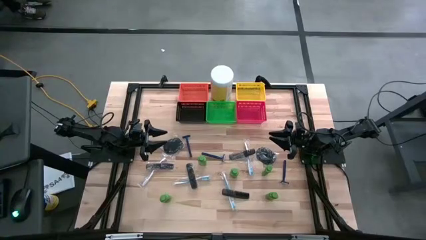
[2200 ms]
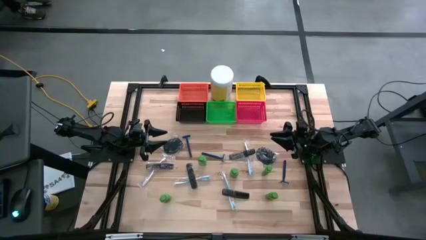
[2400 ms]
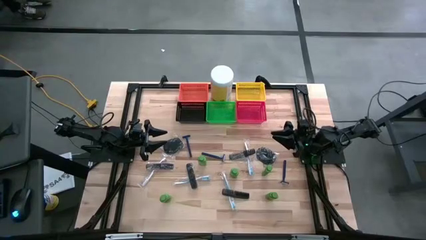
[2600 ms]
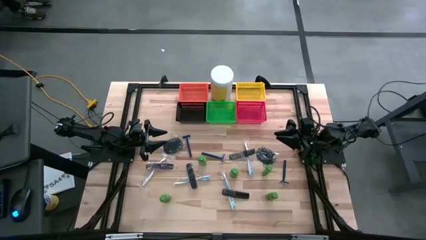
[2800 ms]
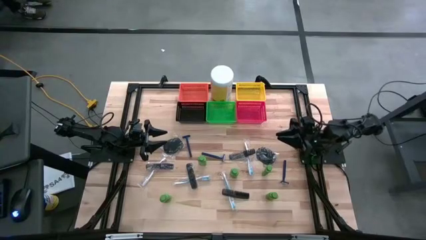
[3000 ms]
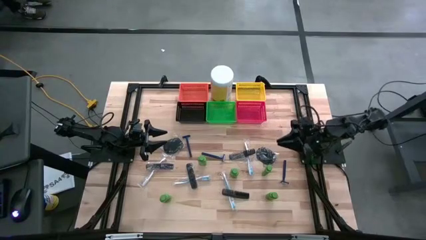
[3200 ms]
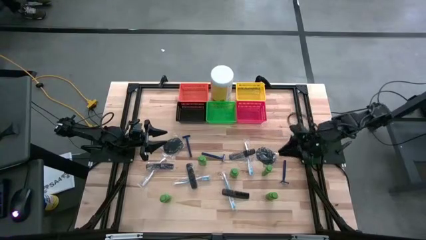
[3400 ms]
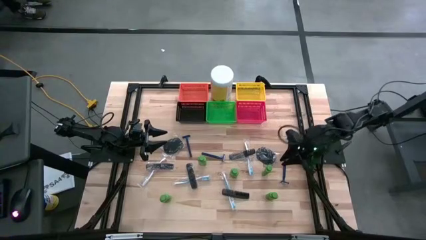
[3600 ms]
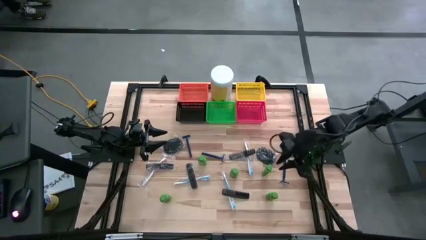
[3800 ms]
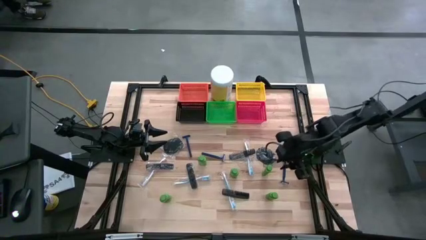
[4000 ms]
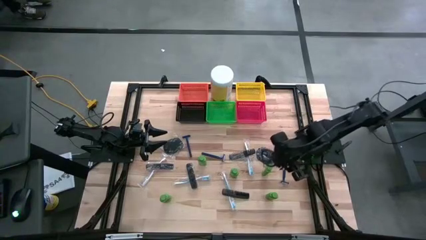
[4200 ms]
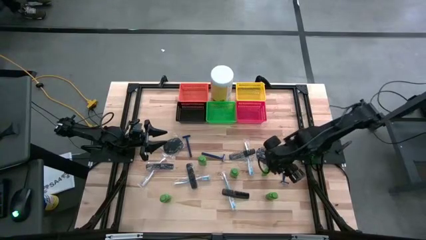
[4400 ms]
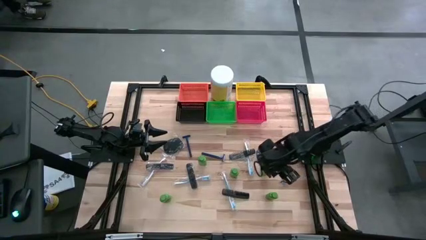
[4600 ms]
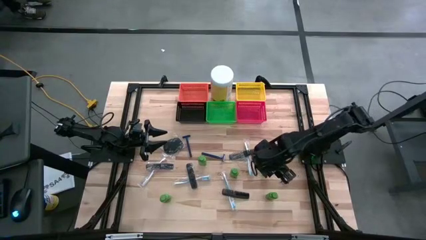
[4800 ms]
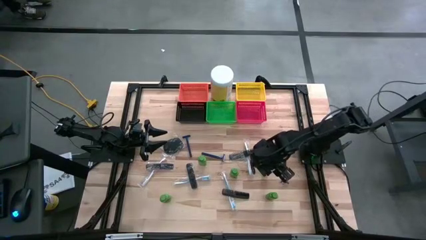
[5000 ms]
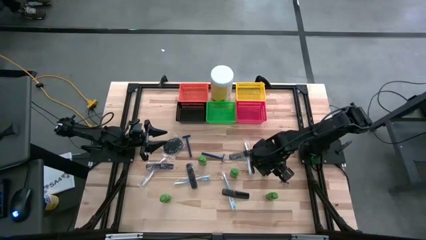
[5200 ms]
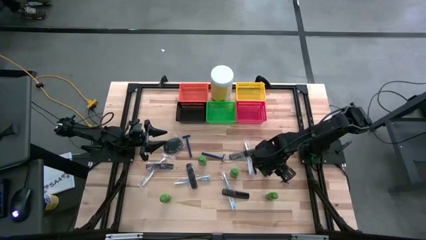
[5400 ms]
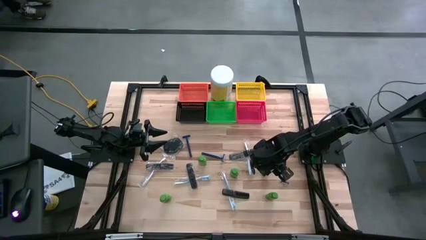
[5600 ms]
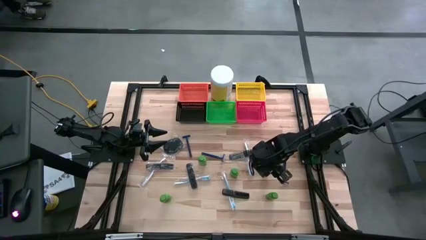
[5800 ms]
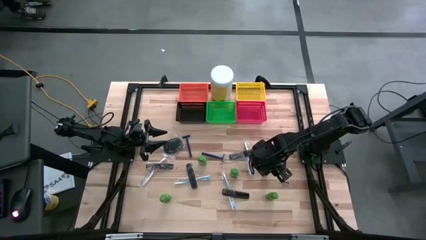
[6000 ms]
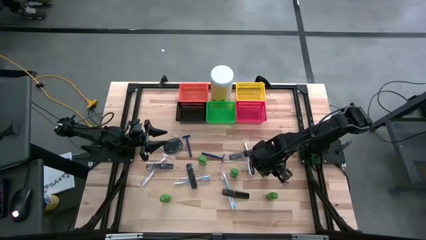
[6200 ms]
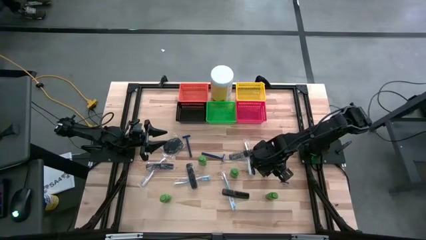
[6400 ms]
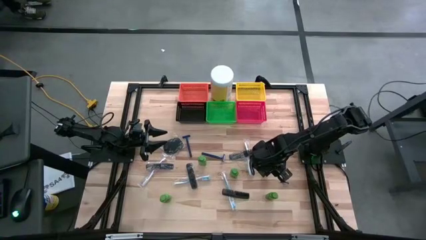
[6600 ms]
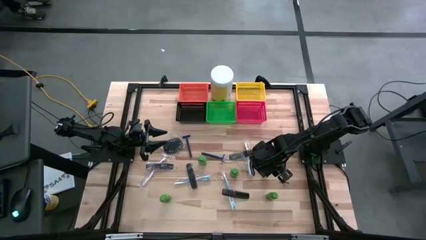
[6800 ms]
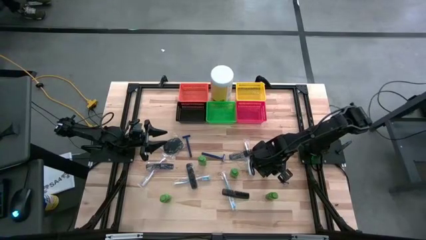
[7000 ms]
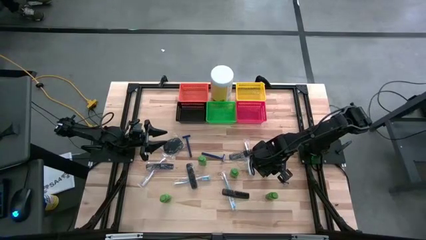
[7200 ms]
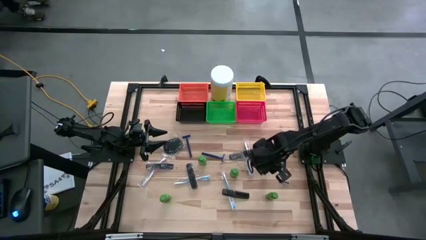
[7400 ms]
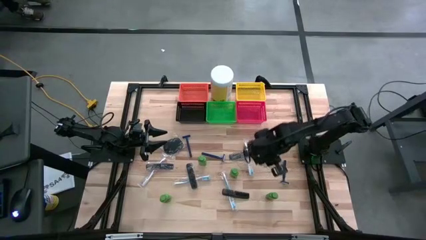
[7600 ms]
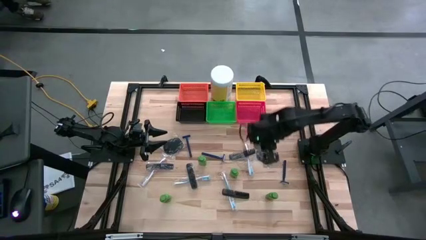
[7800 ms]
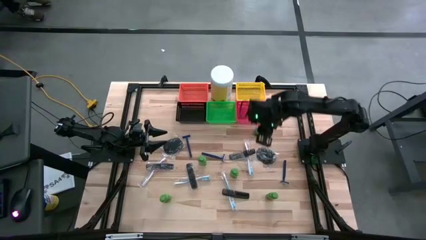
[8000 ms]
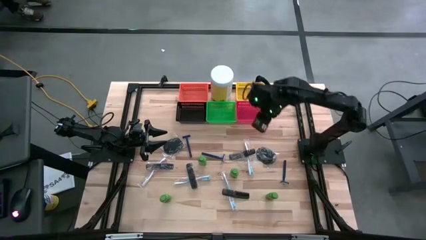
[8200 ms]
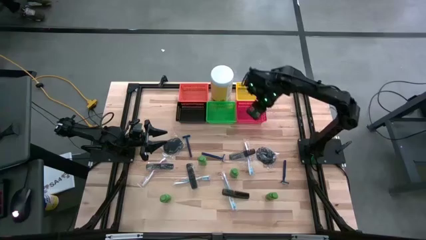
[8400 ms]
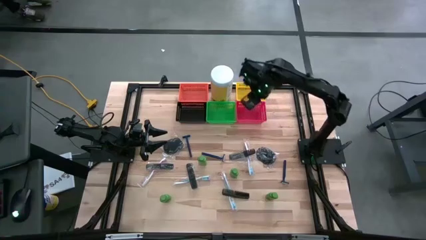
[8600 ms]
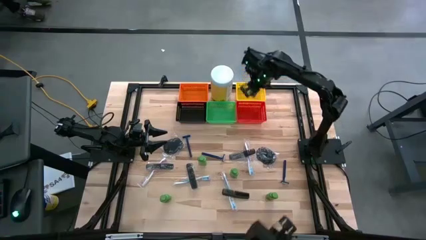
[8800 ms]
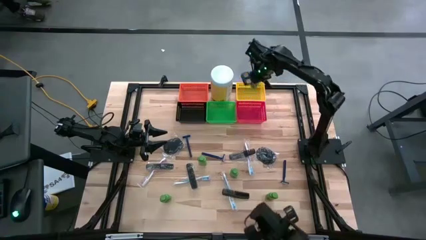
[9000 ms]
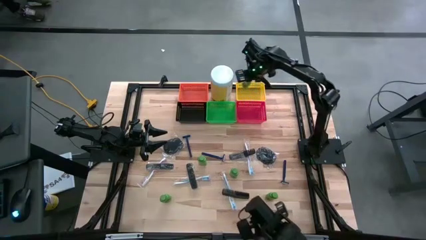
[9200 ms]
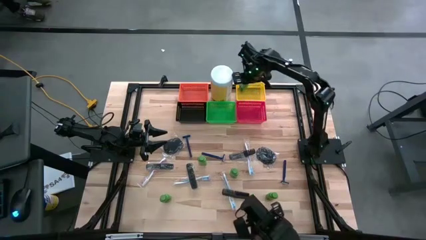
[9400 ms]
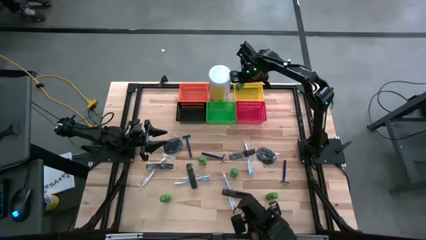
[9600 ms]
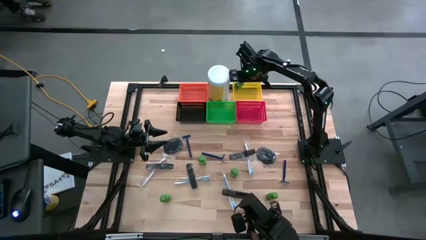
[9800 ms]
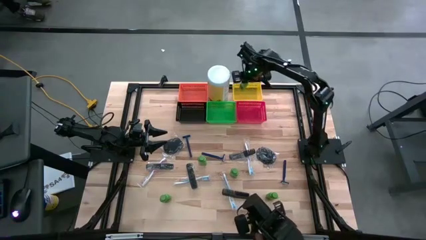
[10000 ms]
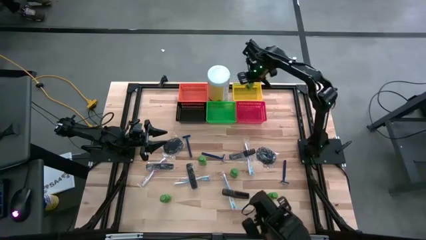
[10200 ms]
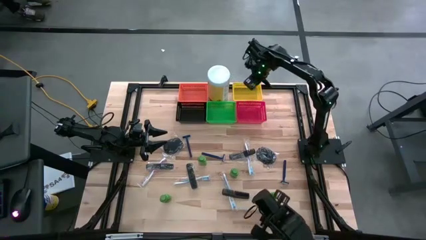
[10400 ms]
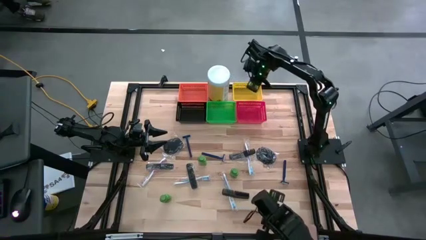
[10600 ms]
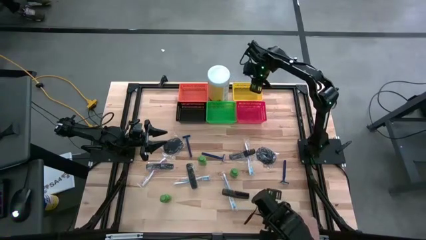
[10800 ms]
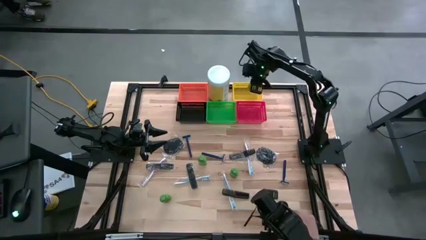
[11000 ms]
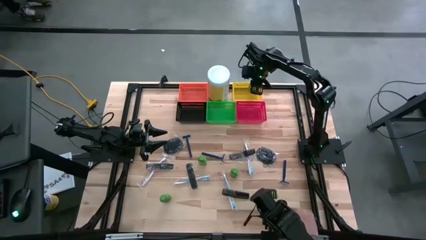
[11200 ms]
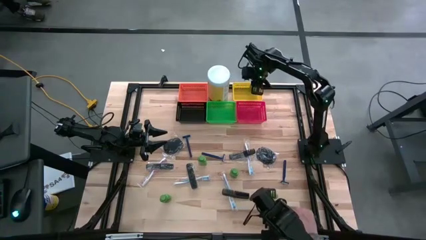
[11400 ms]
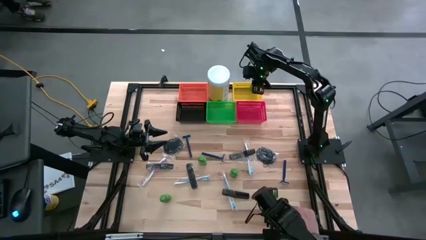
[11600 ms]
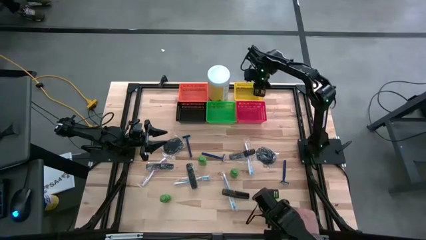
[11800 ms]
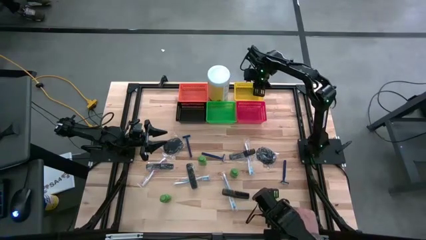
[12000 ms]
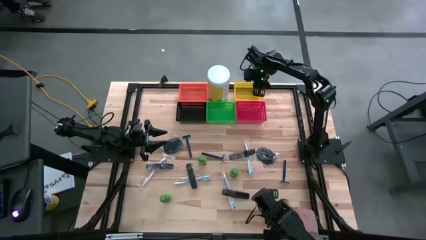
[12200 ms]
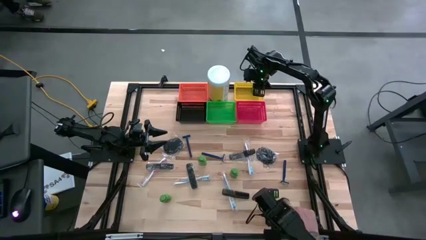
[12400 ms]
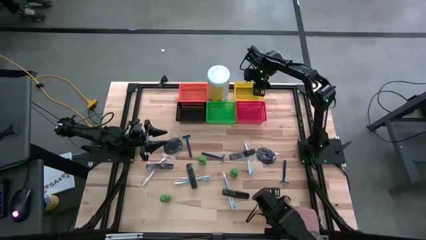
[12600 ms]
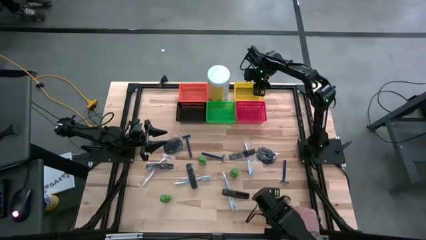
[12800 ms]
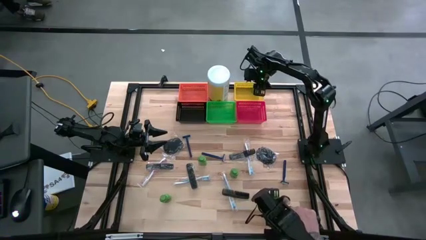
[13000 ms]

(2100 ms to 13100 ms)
Task: Pick & Place Travel size toiletries
Put the green shampoo into the yellow bin
